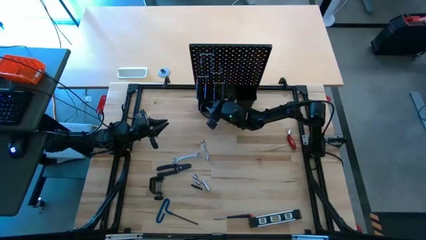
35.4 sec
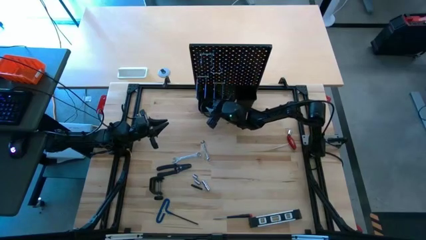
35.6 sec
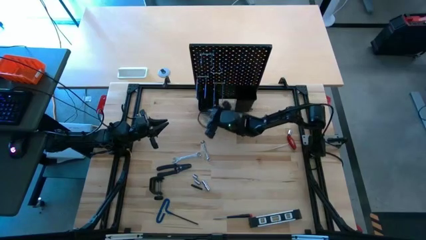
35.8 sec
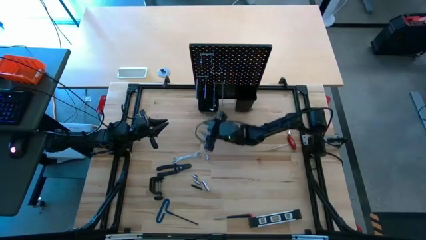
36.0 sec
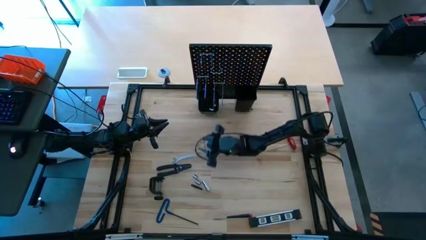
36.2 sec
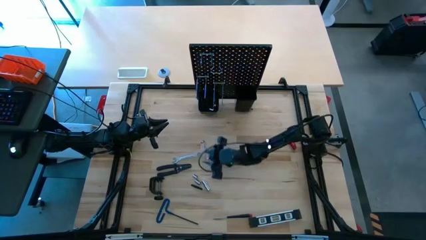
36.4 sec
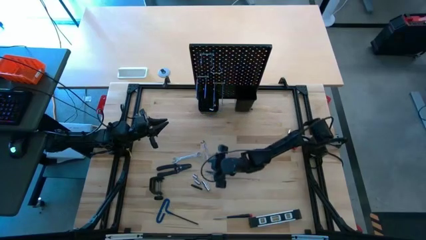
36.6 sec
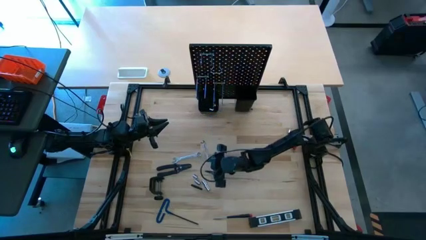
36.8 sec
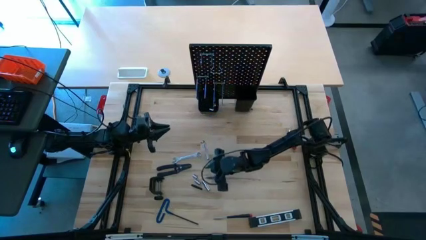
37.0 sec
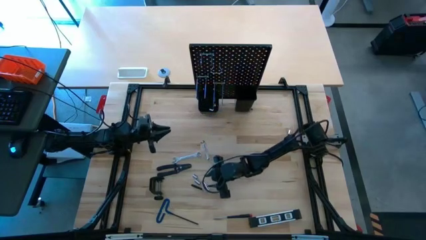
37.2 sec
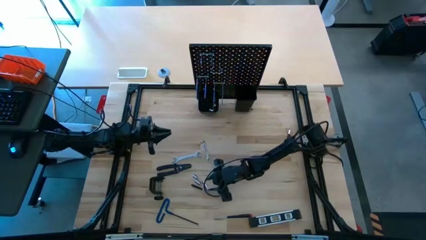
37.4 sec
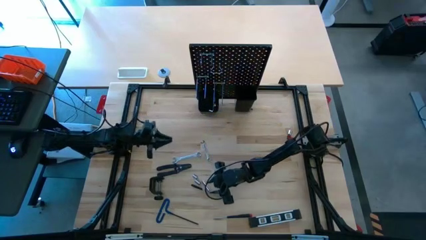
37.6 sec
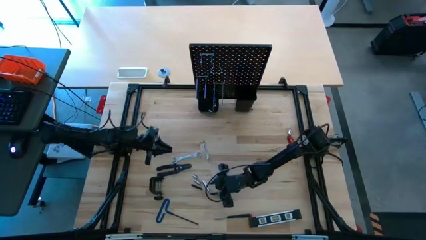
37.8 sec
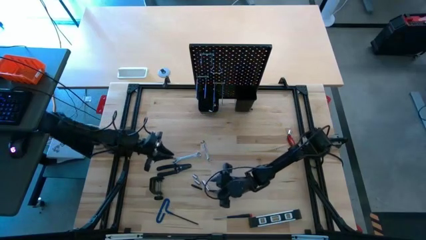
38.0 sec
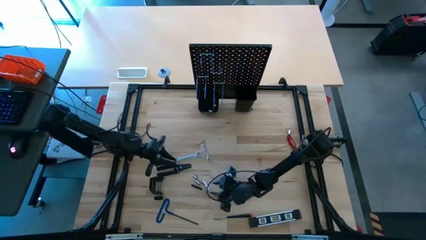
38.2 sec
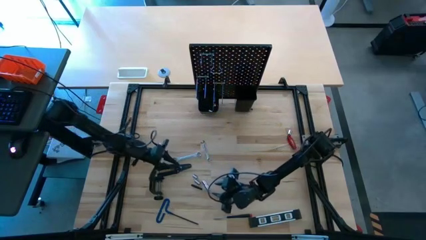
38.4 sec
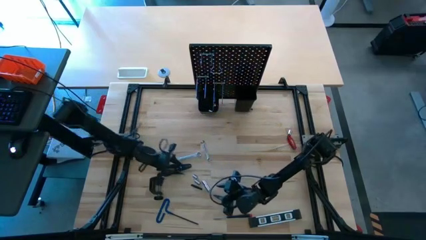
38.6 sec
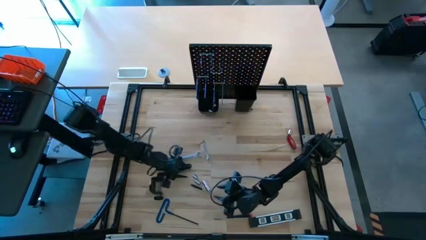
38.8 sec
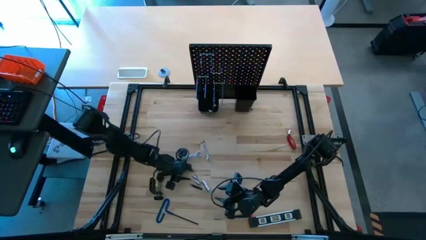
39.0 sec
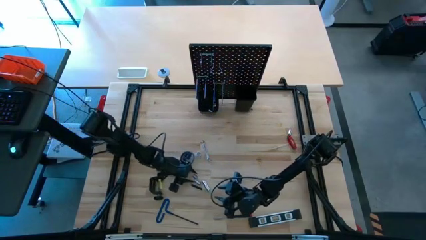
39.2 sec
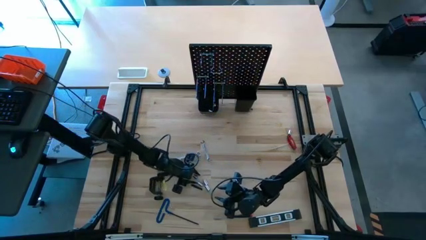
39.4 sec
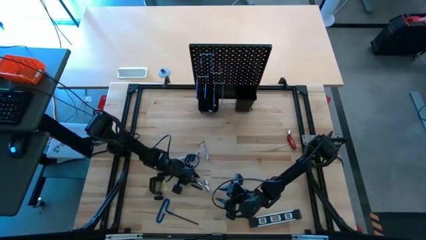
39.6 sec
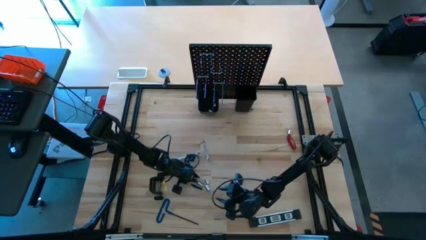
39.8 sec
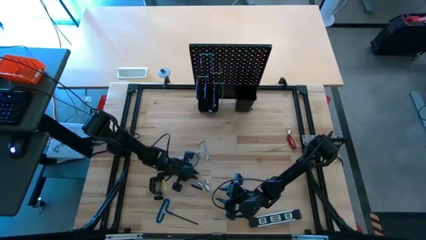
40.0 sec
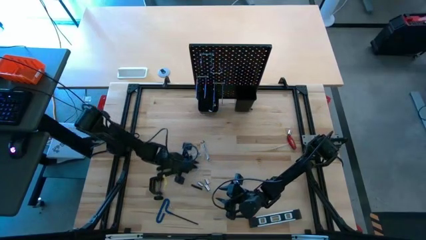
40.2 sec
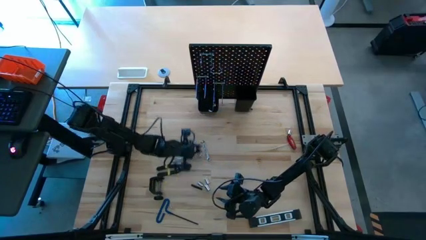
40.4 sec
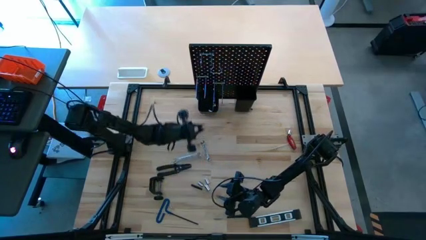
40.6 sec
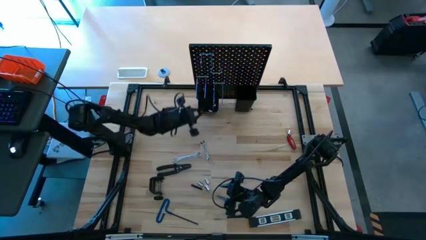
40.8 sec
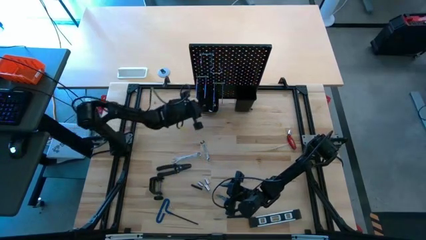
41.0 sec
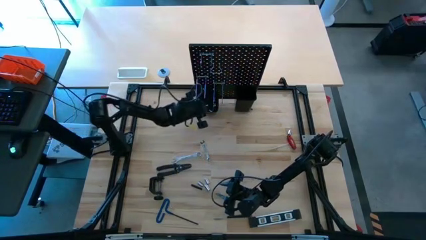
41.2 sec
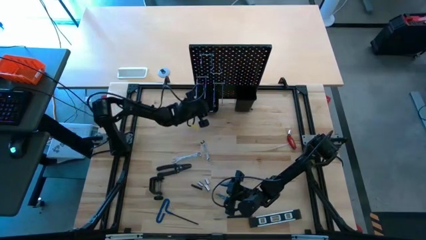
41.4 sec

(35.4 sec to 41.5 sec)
Task: Hang tools onto peg board
Put the socket into the left bin on the pegboard

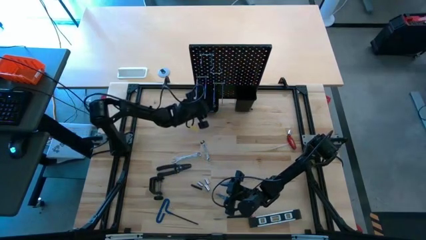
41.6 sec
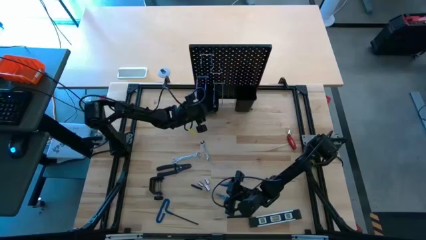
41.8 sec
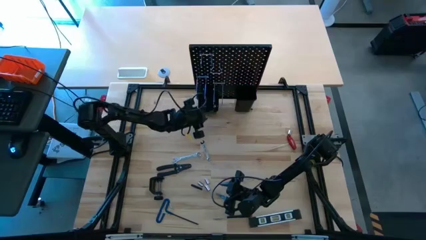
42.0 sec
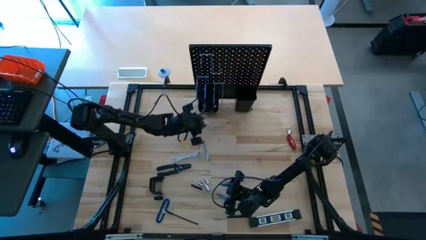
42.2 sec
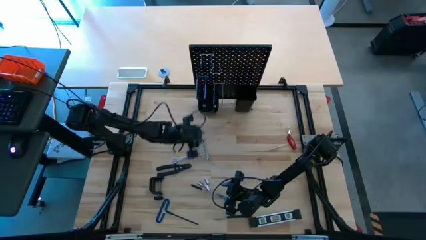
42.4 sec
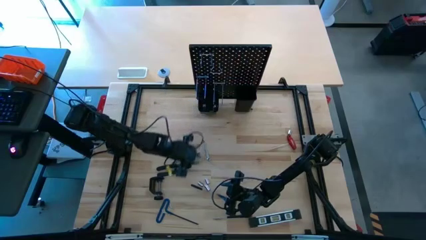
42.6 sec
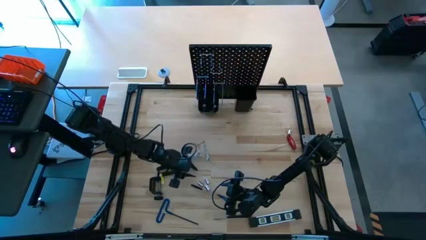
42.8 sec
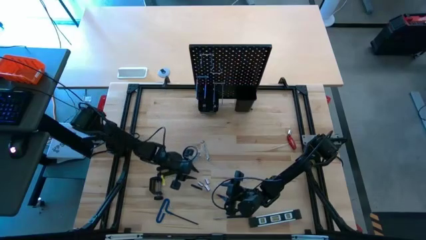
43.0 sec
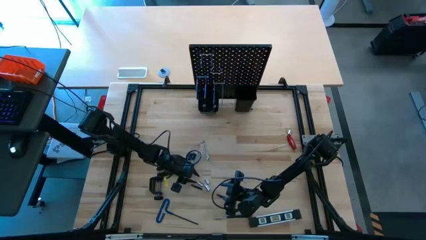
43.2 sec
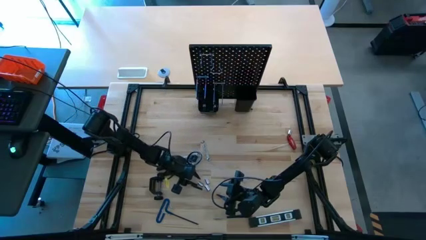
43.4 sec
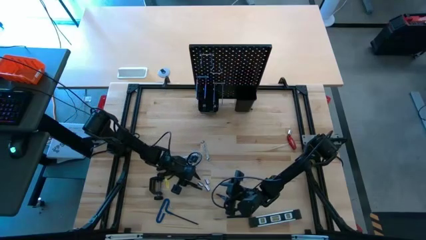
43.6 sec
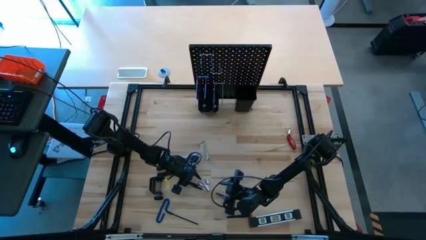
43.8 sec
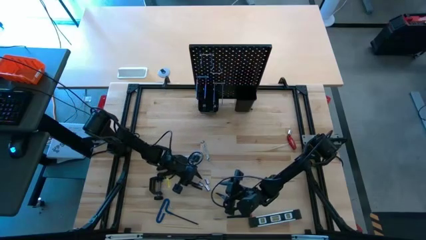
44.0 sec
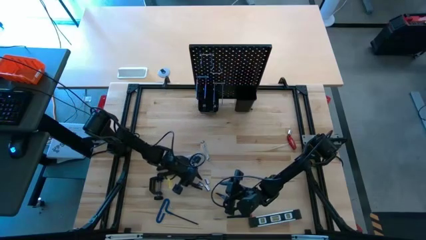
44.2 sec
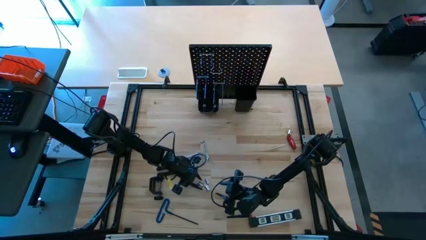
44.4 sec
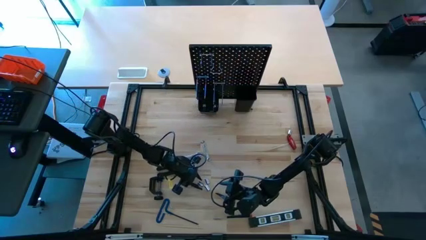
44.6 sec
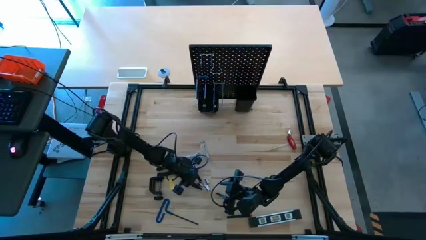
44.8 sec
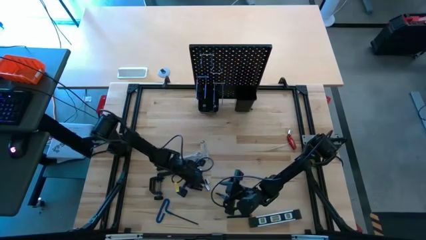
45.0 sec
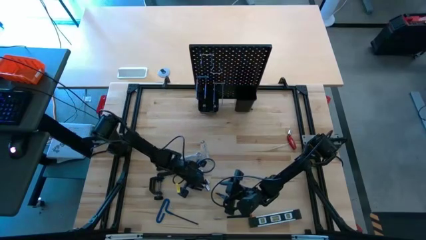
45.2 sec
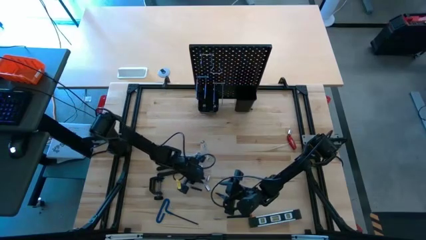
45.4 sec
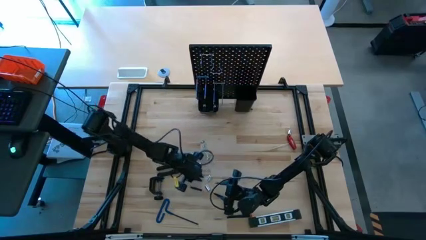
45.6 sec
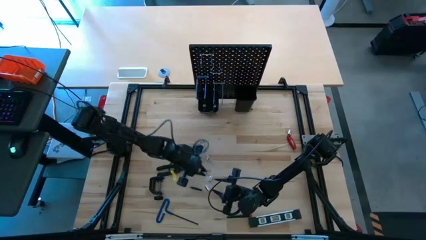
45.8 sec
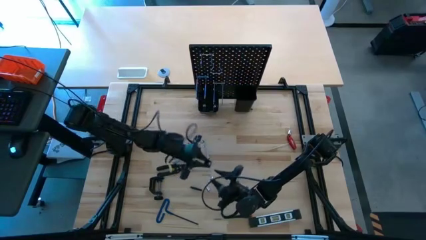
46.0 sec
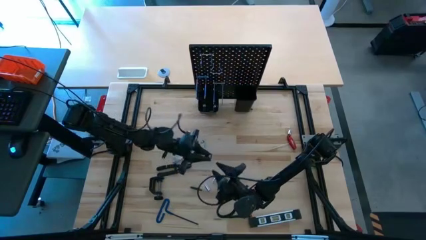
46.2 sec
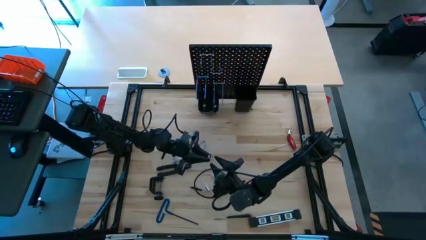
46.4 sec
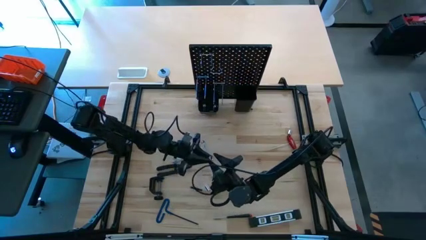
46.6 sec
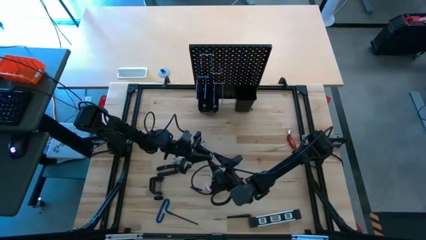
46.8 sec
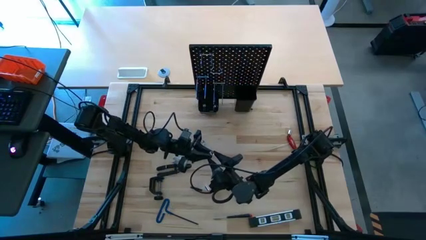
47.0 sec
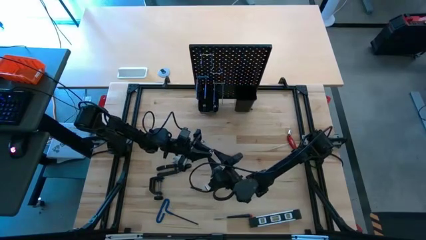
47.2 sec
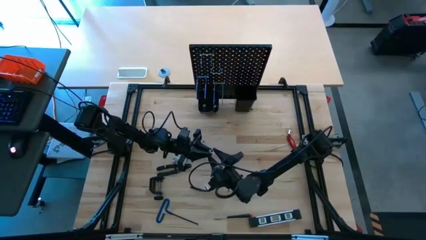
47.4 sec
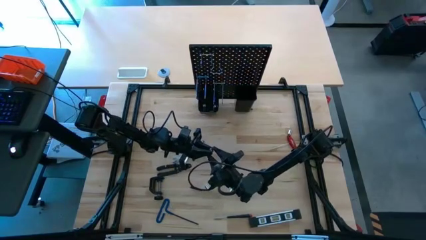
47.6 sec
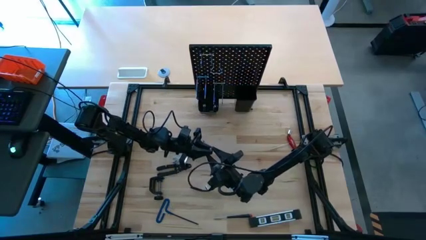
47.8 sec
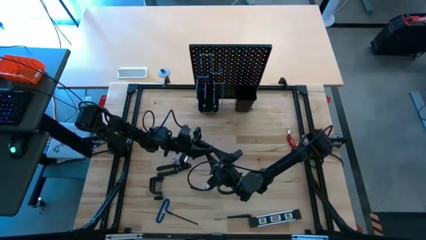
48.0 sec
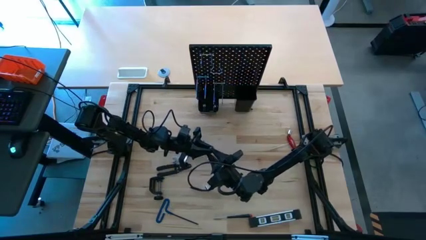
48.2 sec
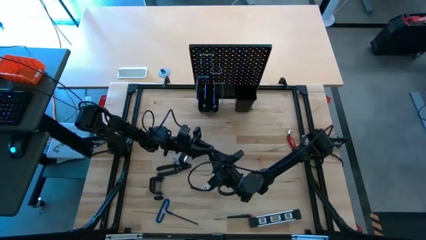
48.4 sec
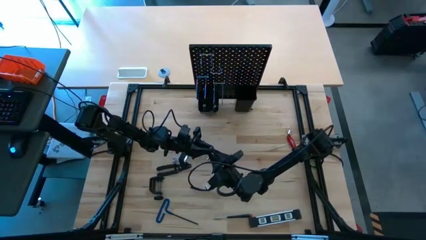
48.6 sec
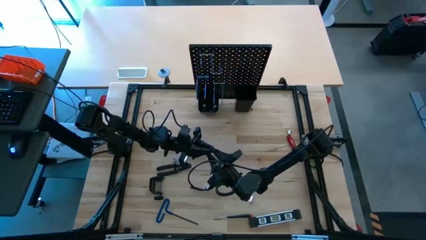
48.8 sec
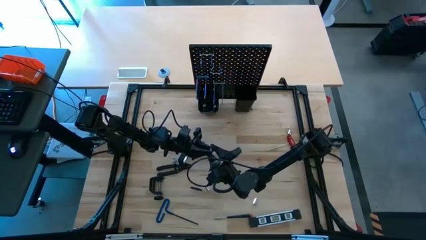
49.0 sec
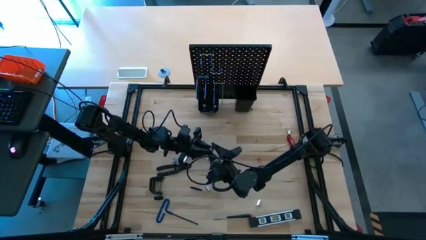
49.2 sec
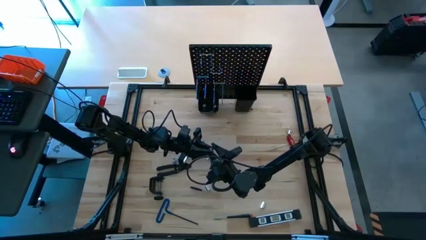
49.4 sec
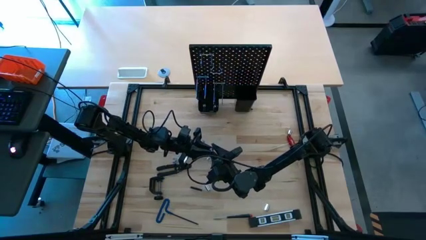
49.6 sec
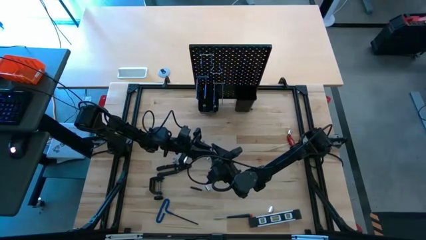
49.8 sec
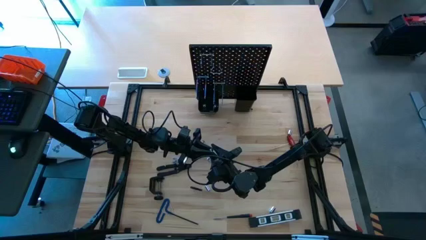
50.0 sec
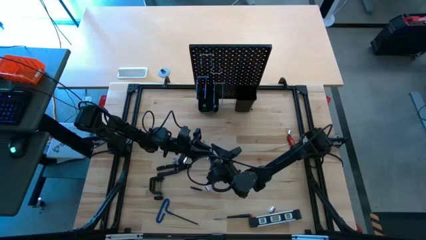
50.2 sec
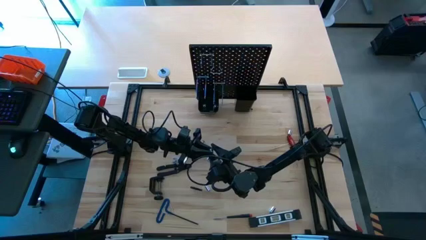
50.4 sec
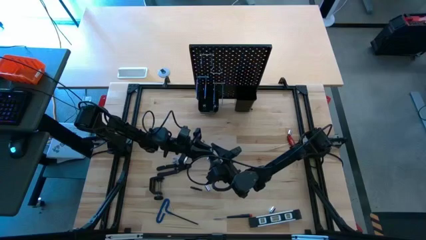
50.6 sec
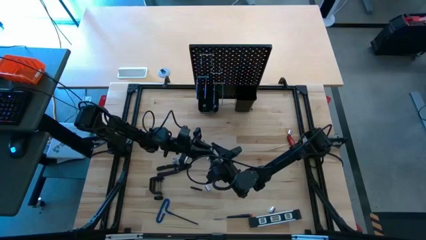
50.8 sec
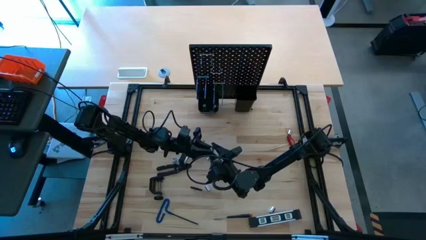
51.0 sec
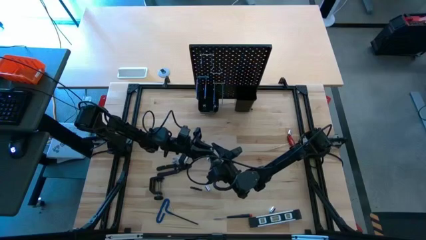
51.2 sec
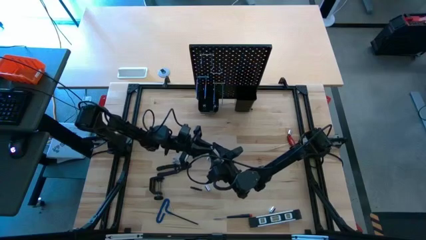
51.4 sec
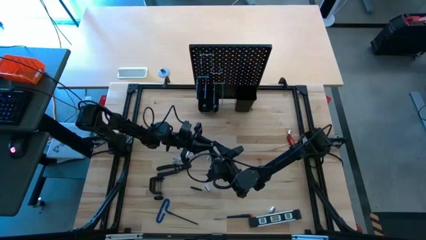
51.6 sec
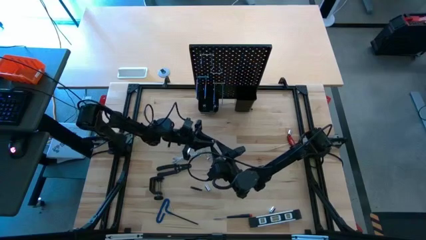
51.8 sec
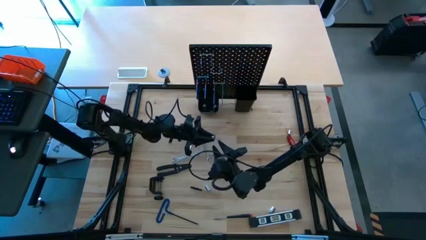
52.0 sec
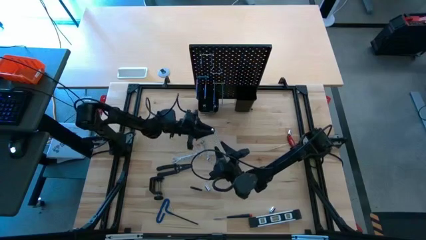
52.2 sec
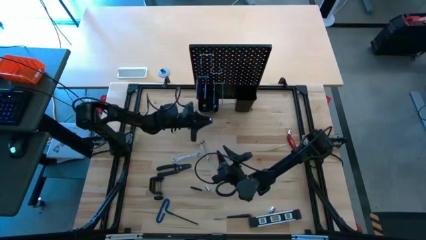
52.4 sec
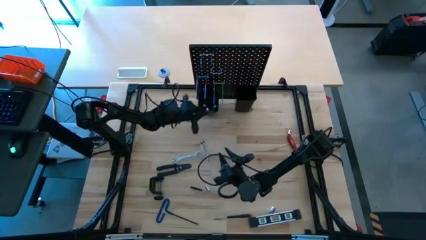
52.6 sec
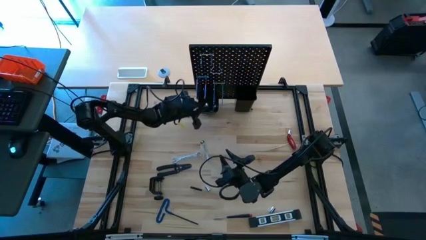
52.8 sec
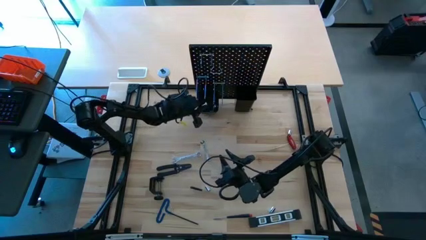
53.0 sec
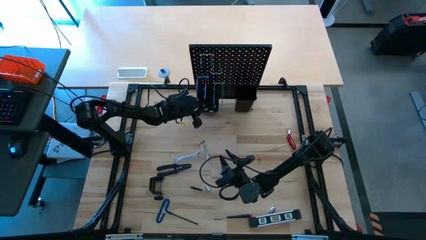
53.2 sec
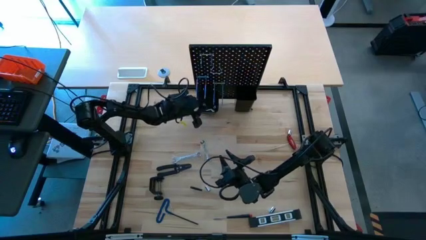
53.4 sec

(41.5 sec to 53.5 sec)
Put the socket into the left bin on the pegboard
